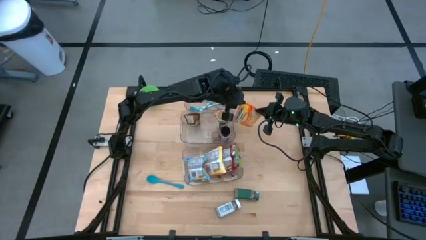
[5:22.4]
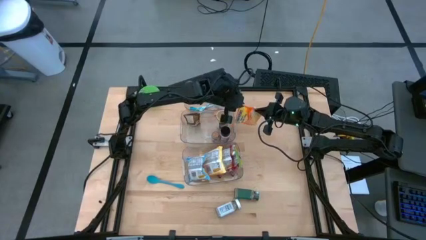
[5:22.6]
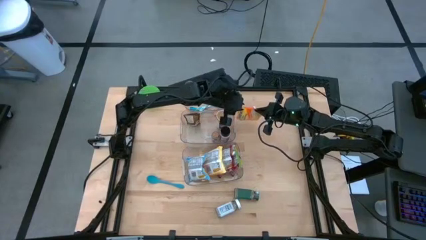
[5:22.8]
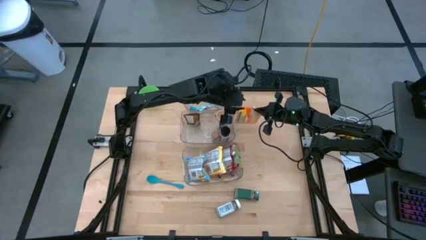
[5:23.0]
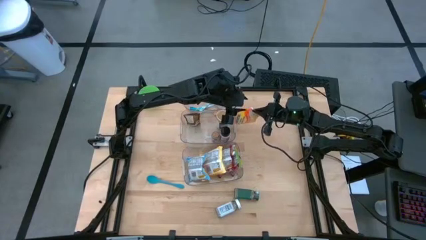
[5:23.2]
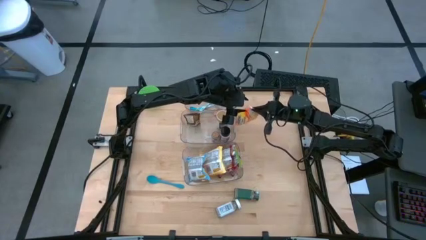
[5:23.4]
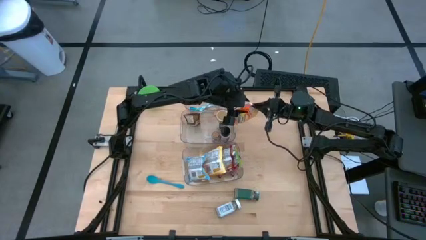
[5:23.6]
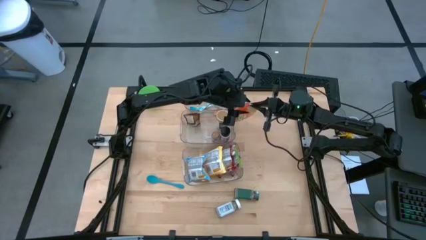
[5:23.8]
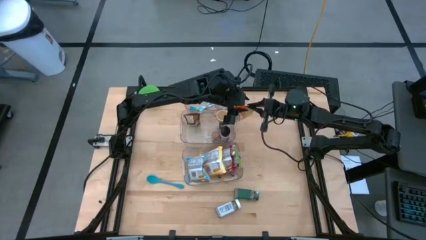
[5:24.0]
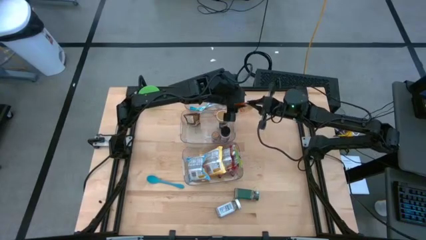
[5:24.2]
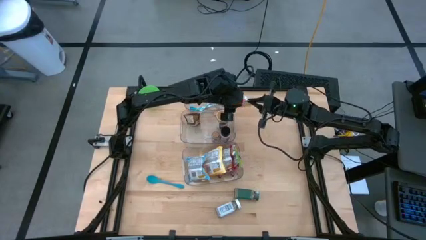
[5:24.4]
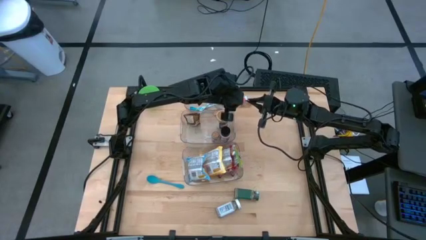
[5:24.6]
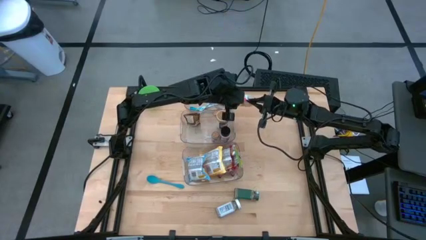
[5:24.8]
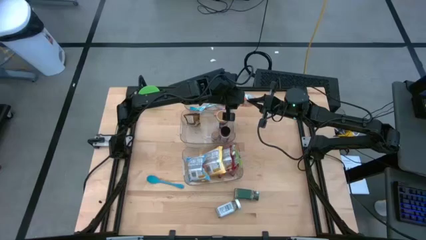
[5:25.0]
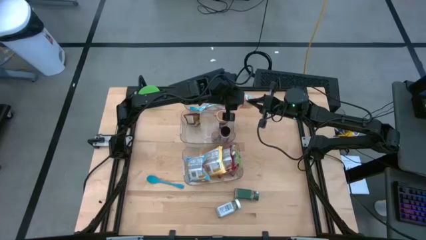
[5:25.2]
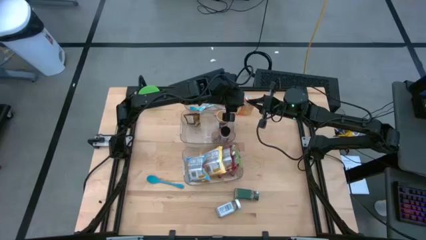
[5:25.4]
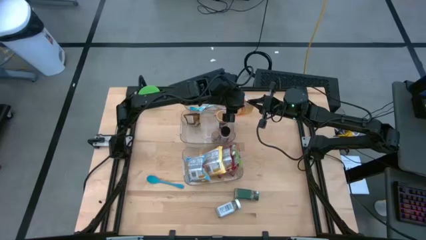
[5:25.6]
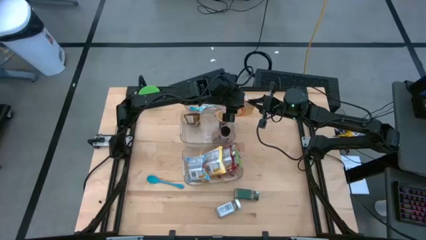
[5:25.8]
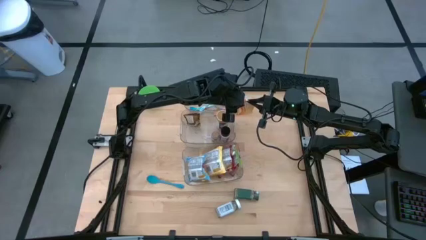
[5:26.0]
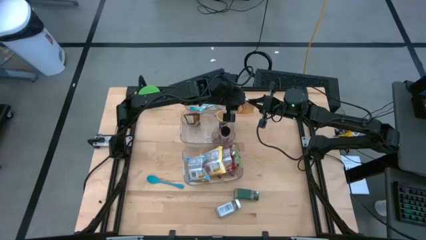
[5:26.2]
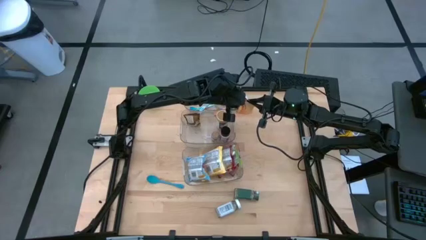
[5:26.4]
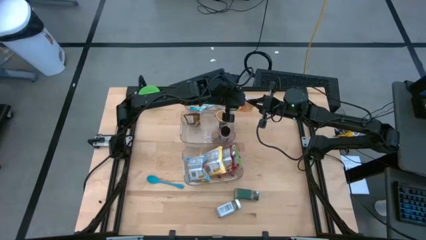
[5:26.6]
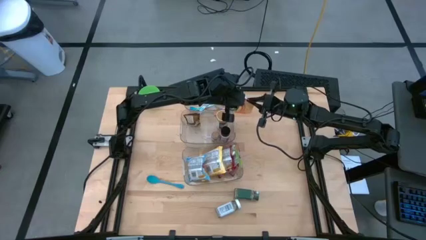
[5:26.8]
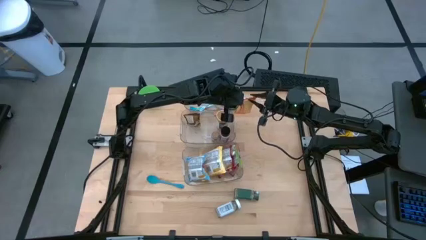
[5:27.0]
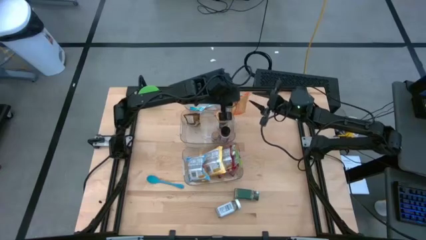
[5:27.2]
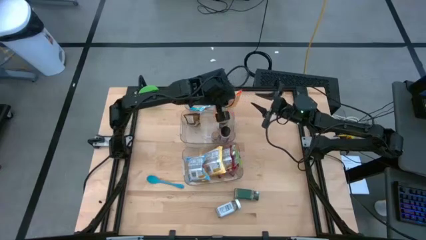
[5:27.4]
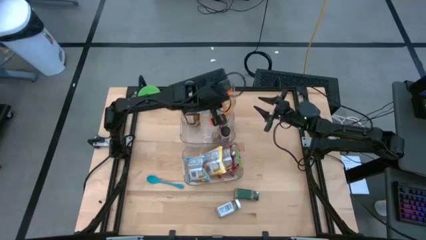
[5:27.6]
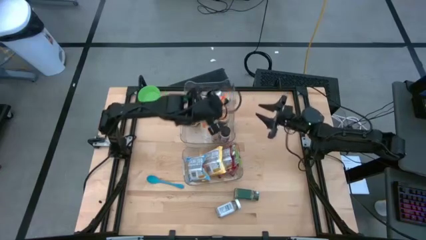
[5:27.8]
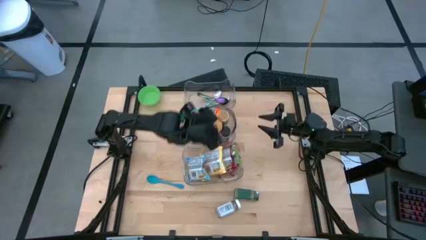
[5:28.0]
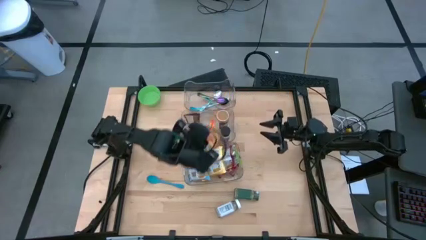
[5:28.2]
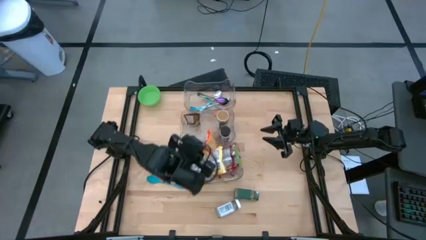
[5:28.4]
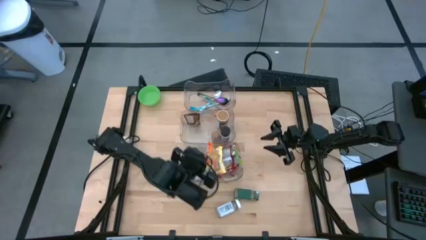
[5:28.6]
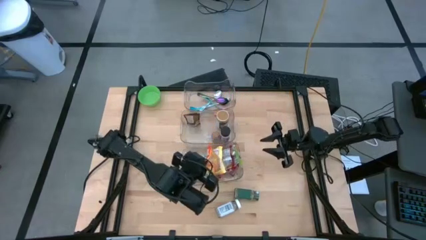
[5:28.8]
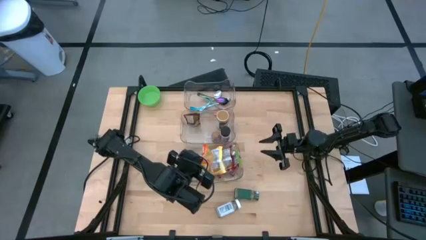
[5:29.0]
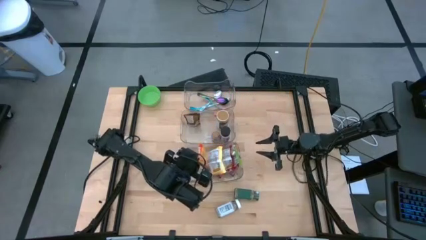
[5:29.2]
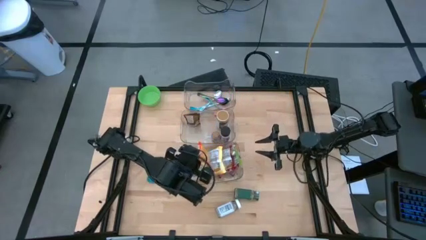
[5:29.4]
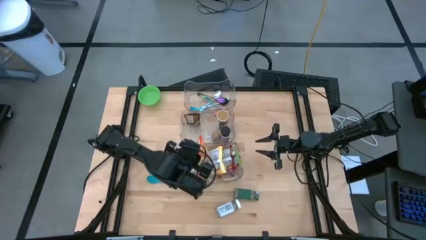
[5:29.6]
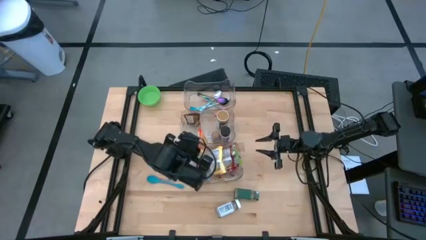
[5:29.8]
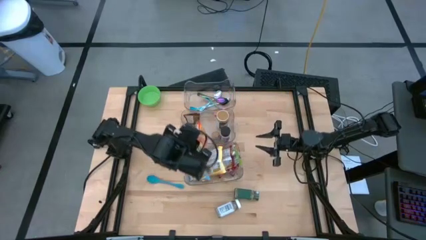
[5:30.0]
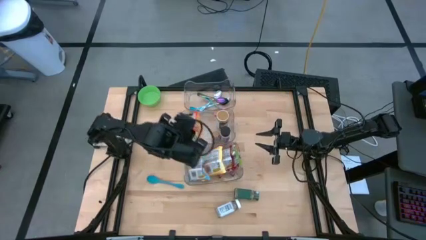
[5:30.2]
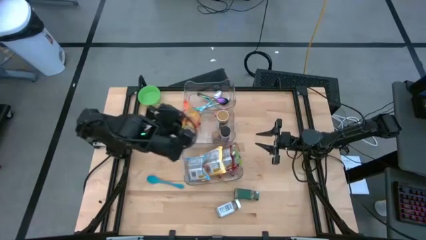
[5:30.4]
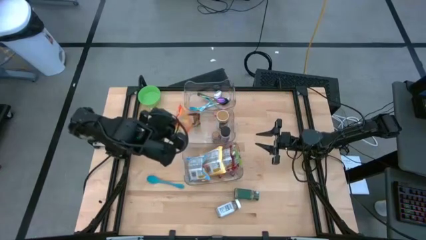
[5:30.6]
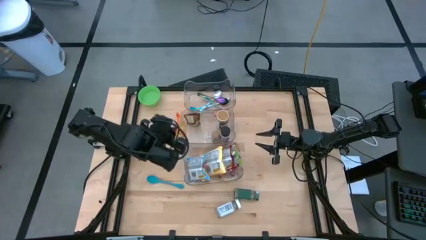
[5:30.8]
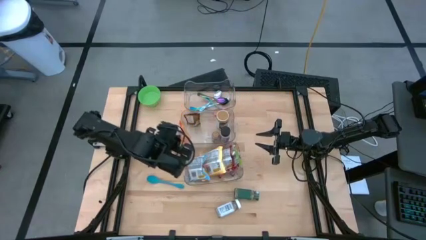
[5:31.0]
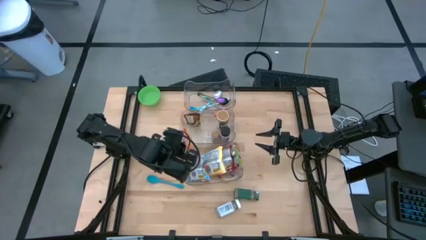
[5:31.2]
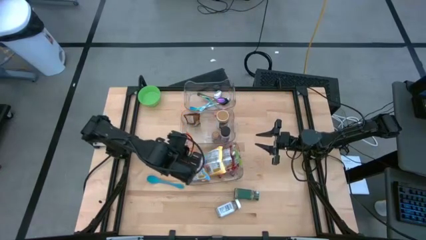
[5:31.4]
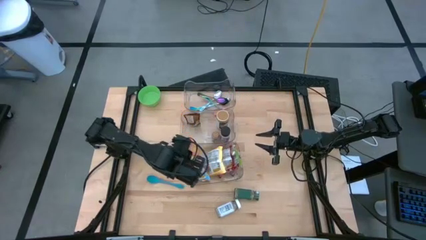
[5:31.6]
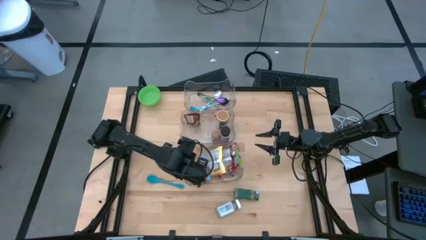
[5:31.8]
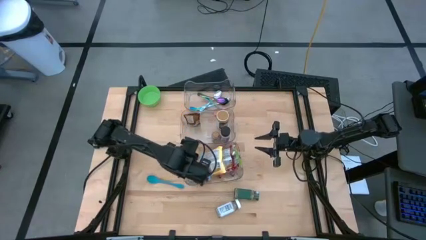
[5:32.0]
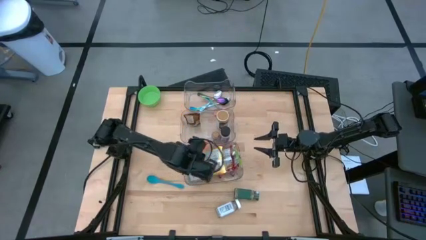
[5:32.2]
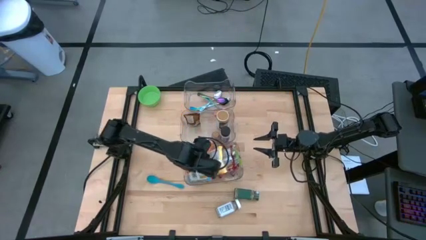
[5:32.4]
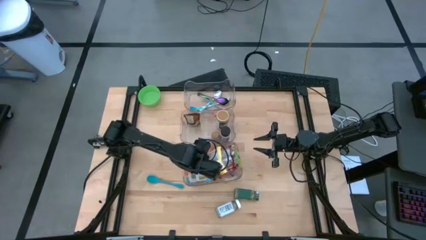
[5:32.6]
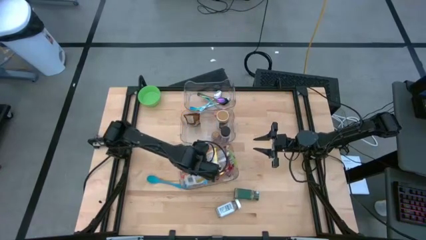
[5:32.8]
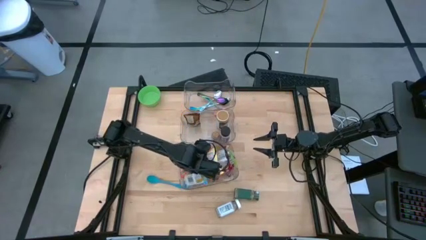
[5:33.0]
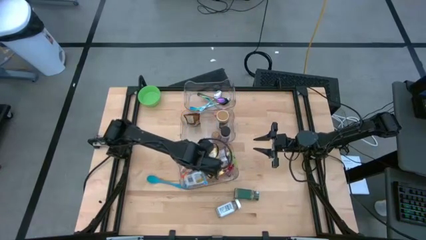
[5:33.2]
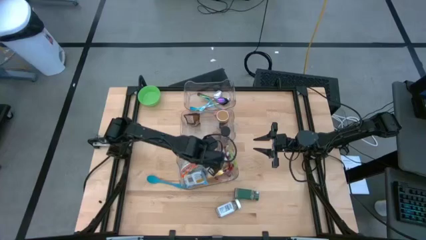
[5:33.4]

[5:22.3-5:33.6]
Task: Pick & Place Food Item
Put the orange noodle pack into the bottom transparent bin

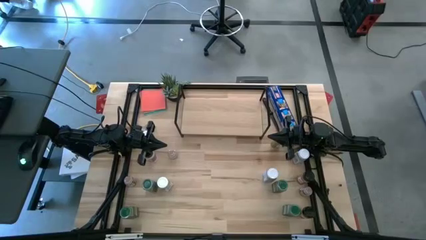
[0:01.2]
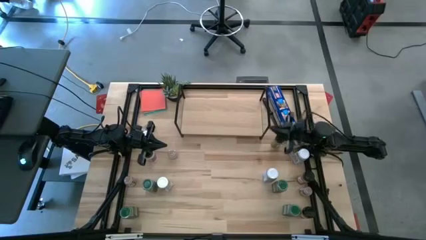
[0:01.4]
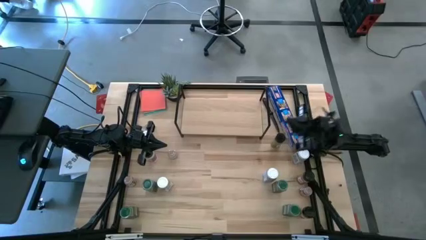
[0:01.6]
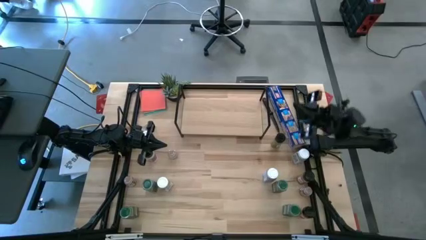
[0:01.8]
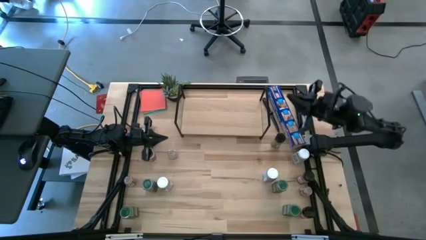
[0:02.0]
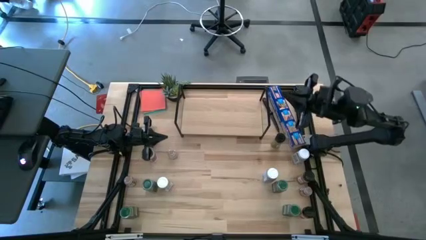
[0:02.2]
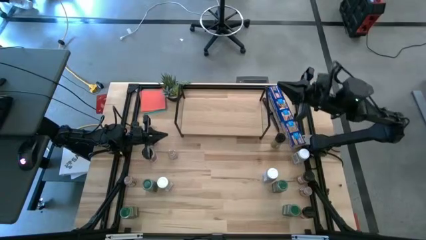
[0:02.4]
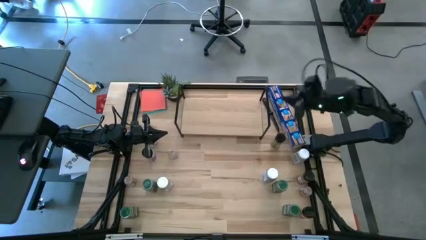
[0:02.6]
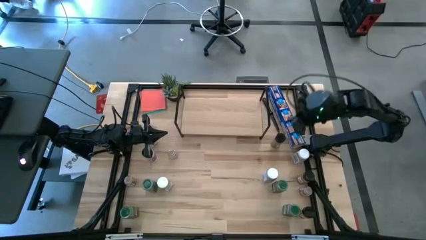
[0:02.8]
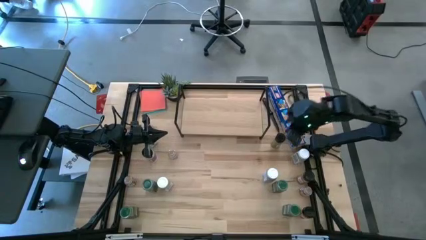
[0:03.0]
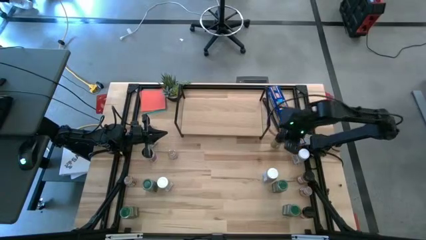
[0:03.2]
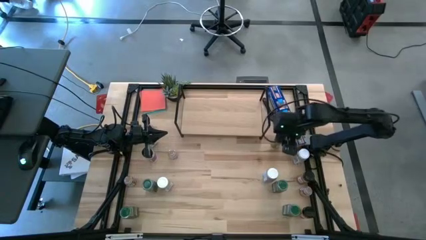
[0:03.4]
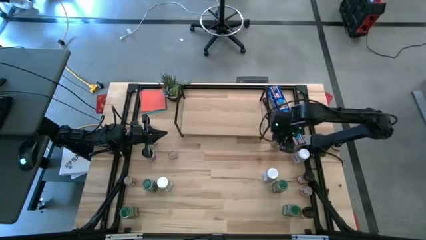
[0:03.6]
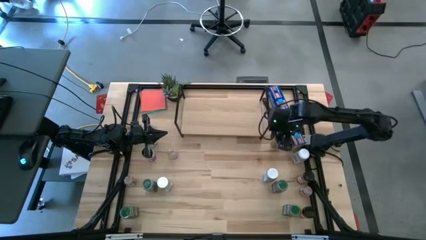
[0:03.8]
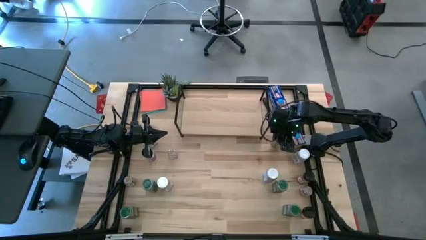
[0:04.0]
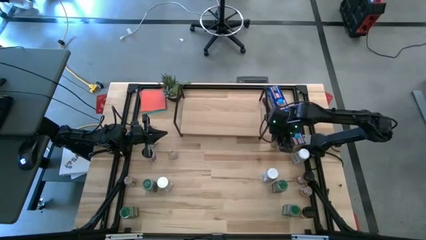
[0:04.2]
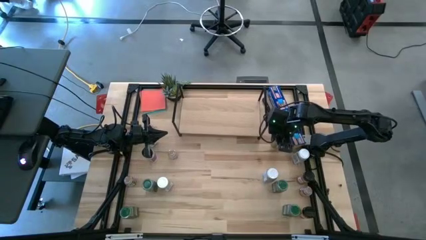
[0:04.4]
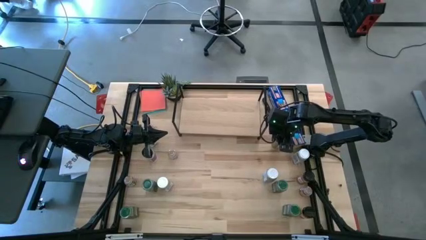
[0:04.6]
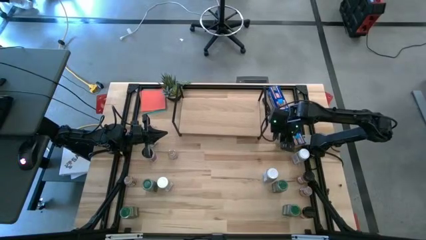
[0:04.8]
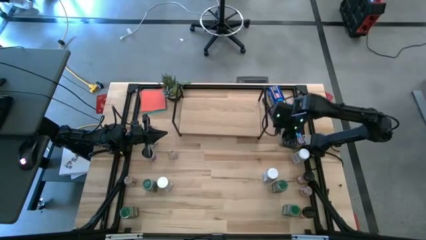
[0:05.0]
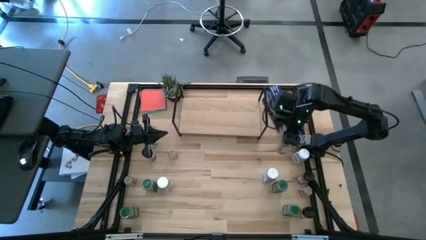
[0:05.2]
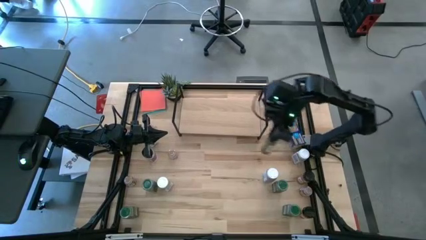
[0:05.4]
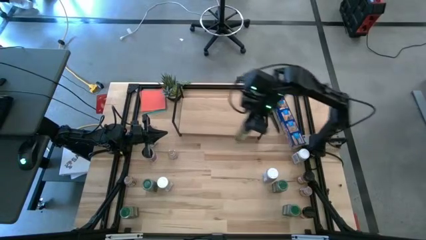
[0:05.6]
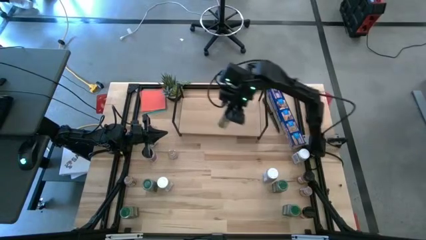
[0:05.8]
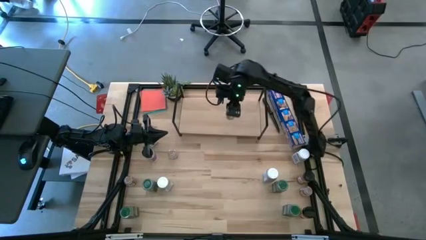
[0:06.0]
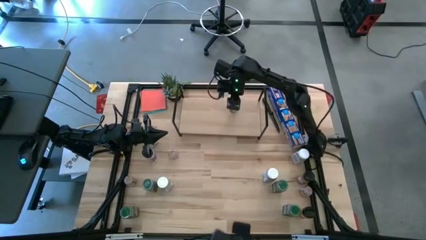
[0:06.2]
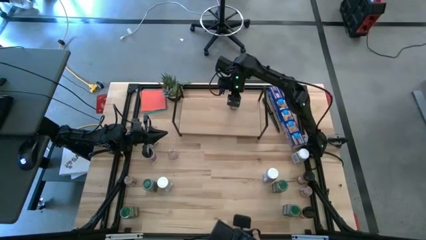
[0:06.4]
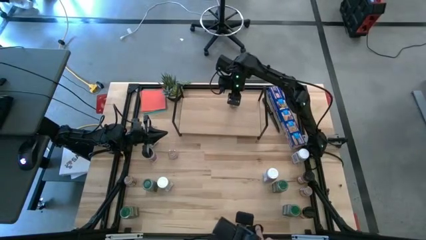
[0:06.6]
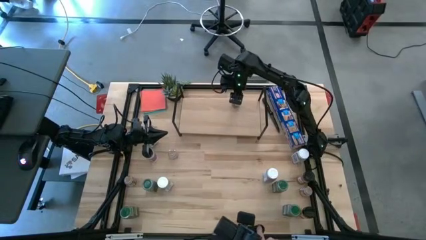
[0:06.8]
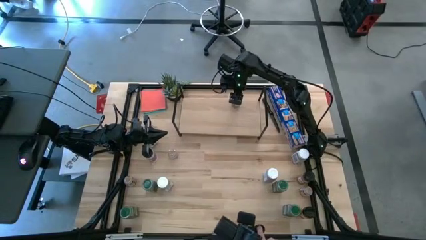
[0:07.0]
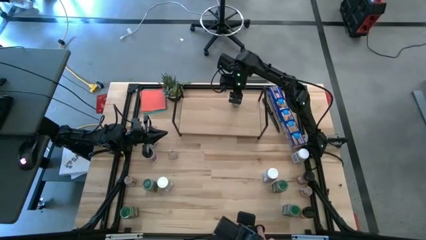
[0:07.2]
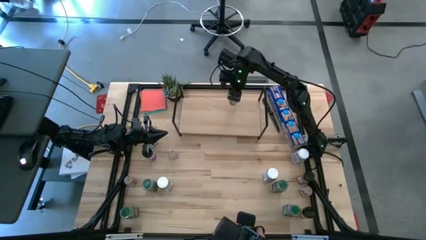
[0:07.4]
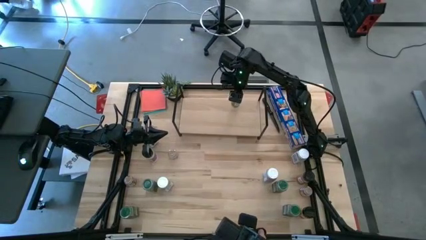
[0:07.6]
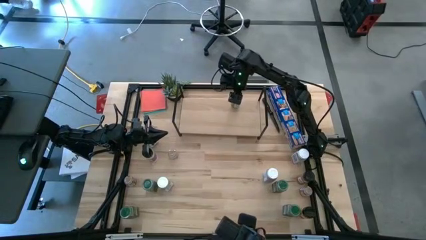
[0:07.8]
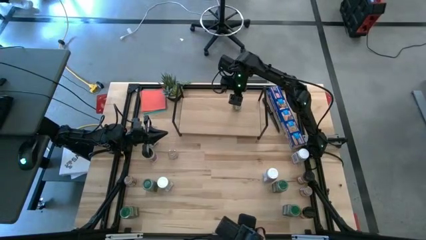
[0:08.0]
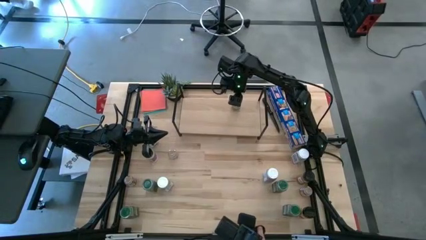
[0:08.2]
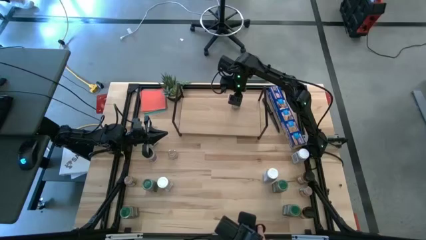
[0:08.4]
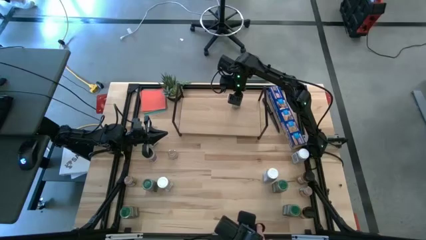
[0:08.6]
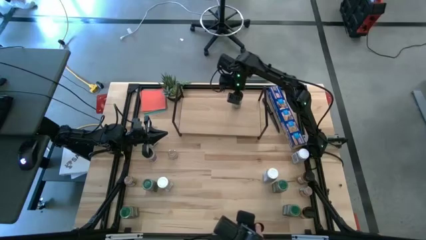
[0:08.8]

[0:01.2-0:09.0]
Task: Shelf spices
Put the black seasoning bottle on the shelf
